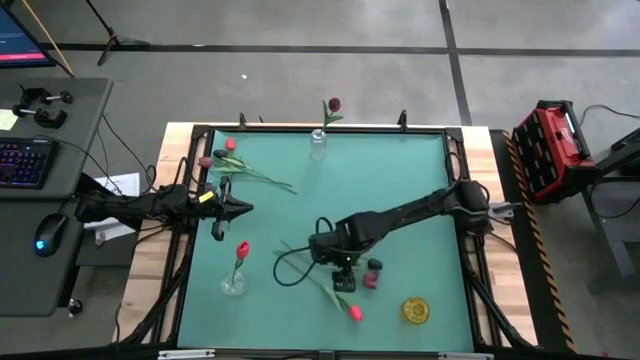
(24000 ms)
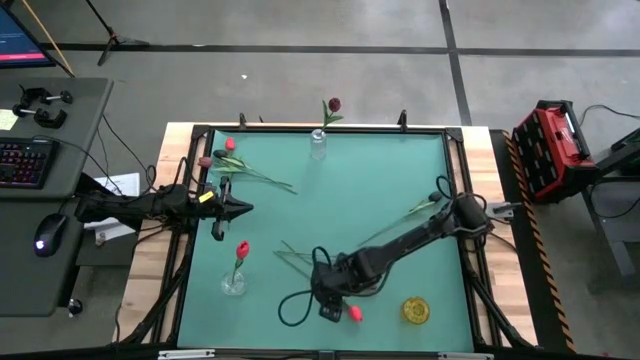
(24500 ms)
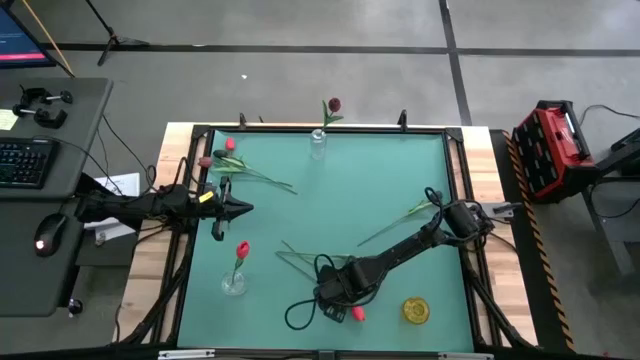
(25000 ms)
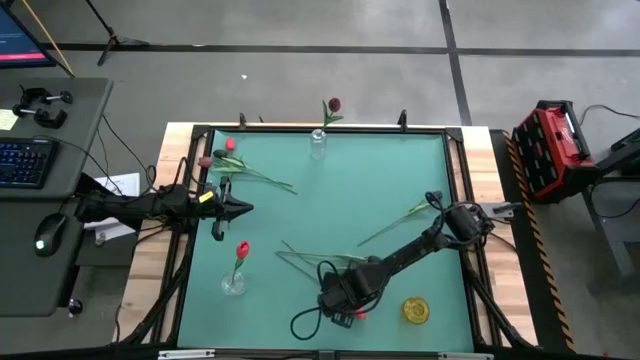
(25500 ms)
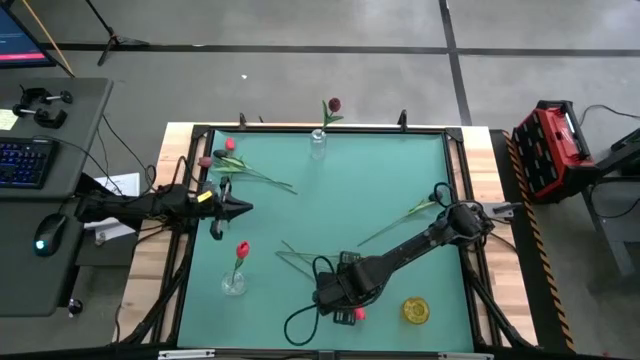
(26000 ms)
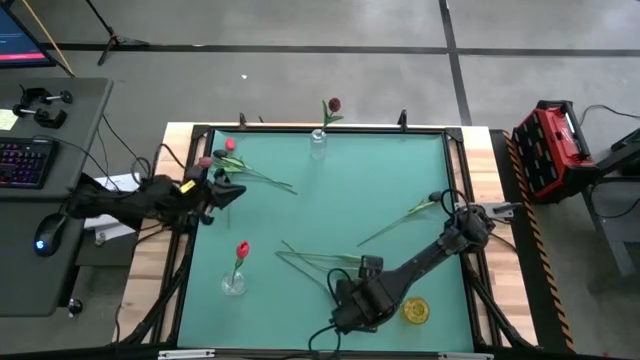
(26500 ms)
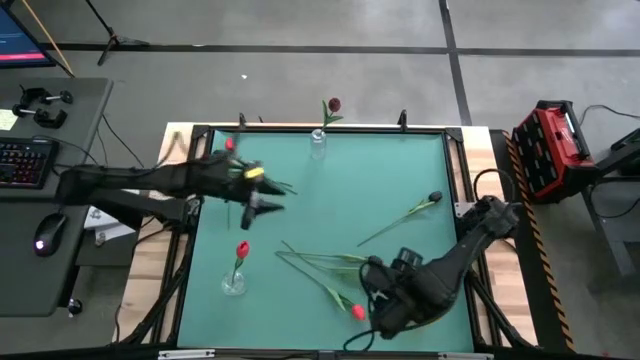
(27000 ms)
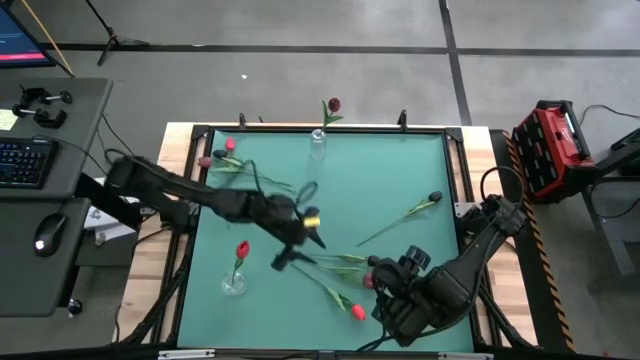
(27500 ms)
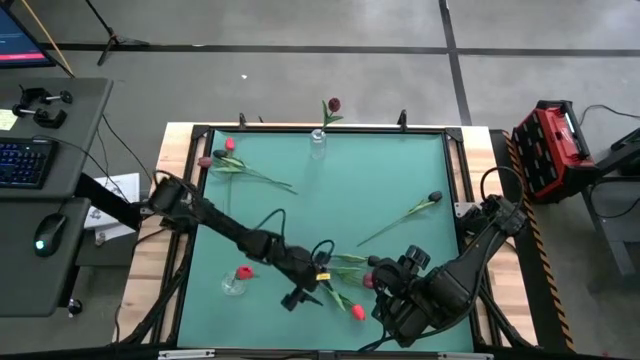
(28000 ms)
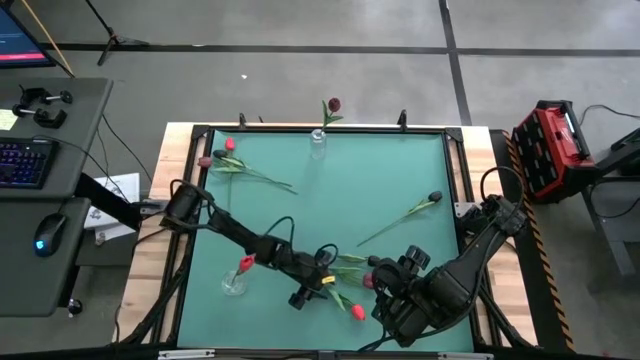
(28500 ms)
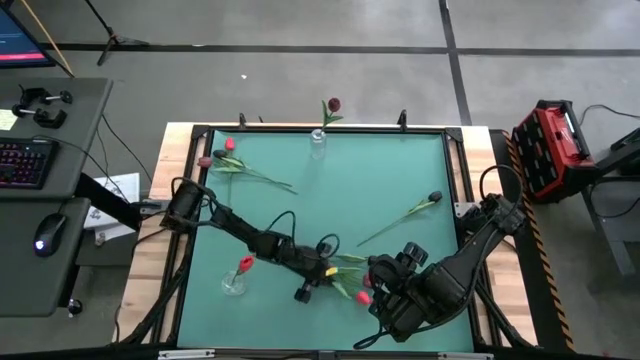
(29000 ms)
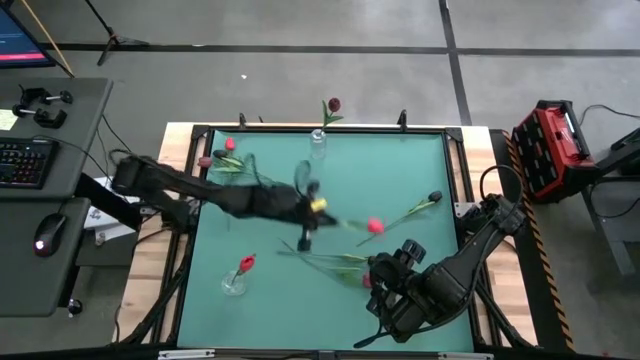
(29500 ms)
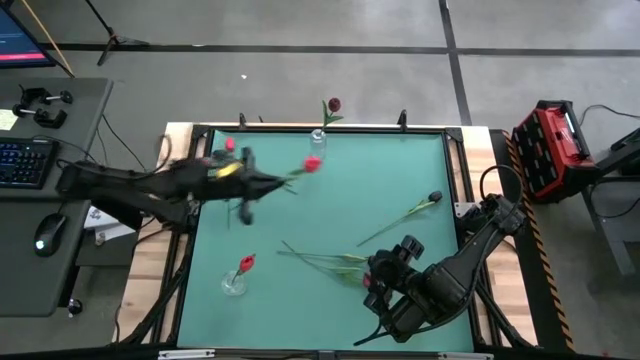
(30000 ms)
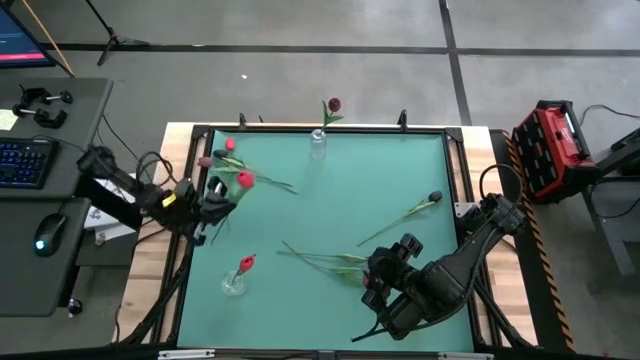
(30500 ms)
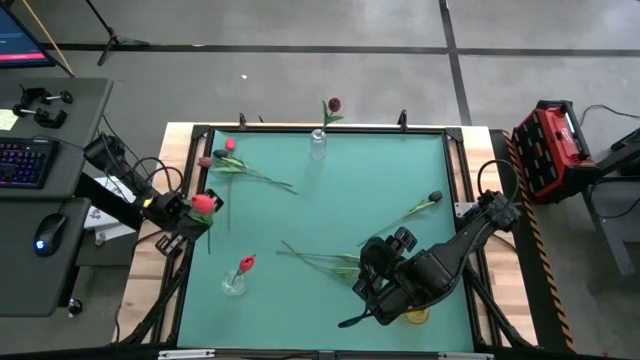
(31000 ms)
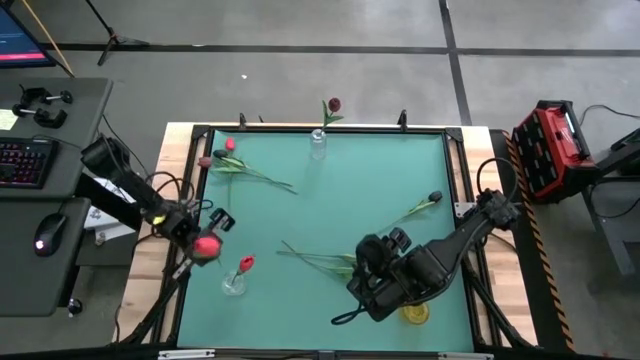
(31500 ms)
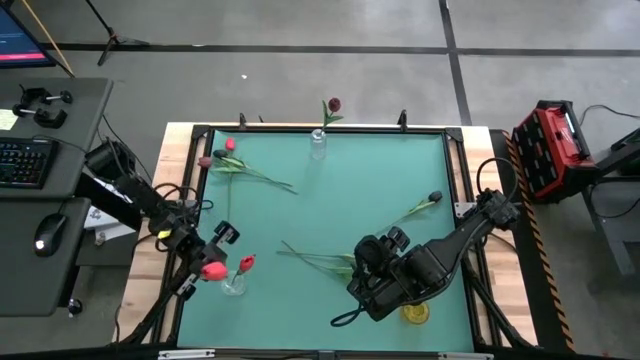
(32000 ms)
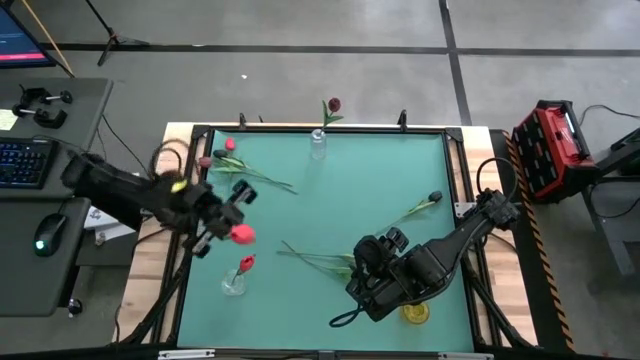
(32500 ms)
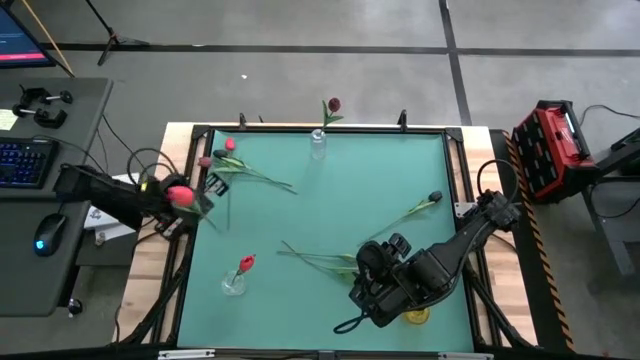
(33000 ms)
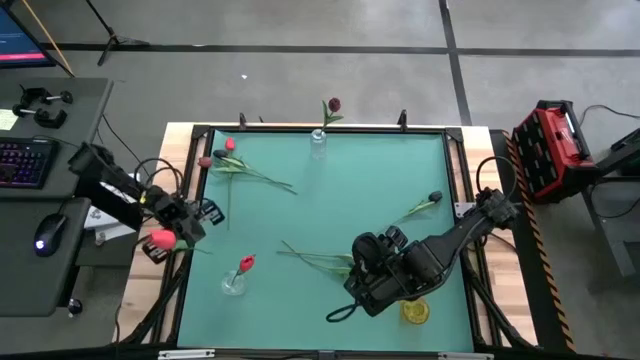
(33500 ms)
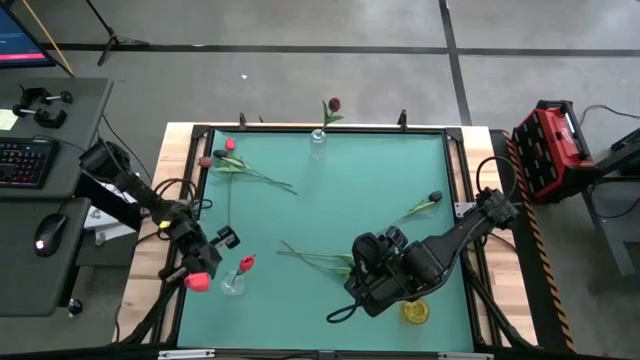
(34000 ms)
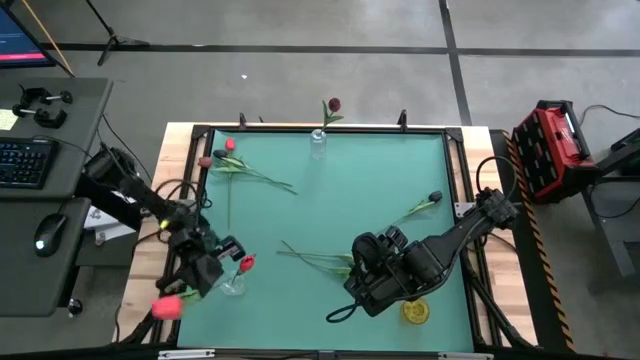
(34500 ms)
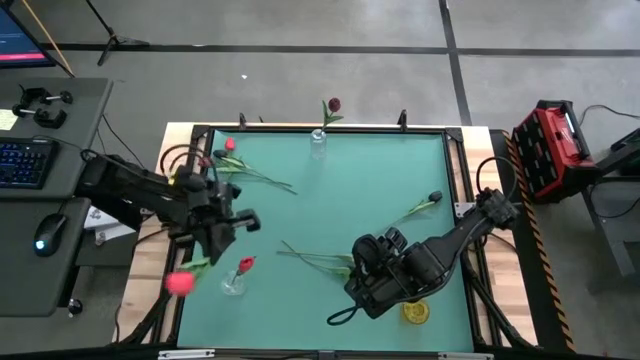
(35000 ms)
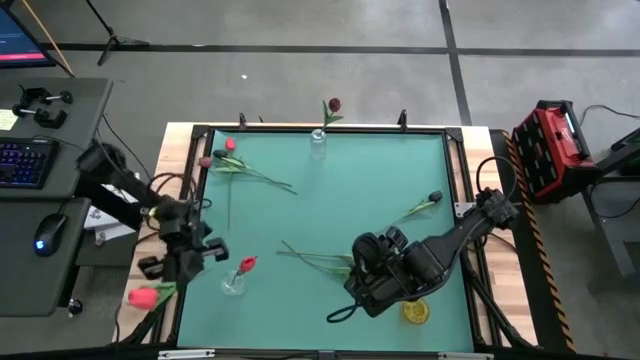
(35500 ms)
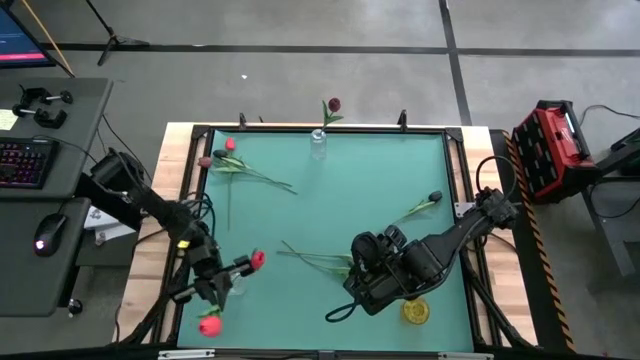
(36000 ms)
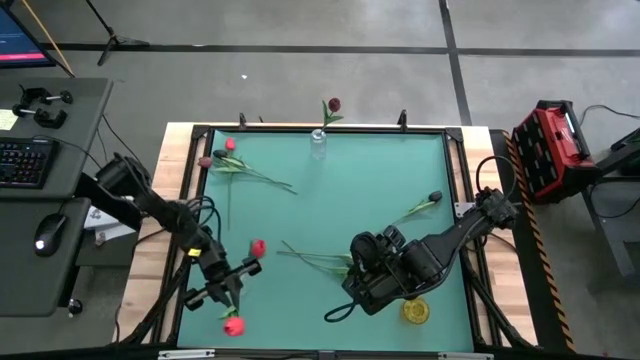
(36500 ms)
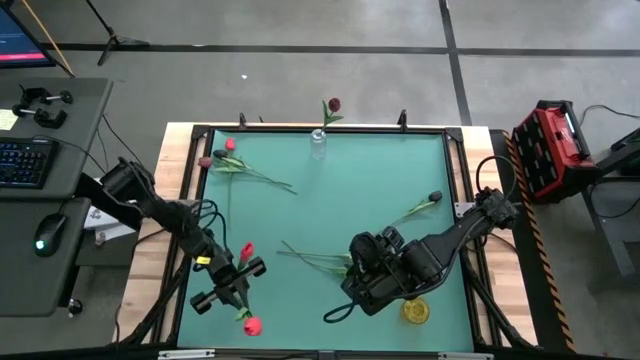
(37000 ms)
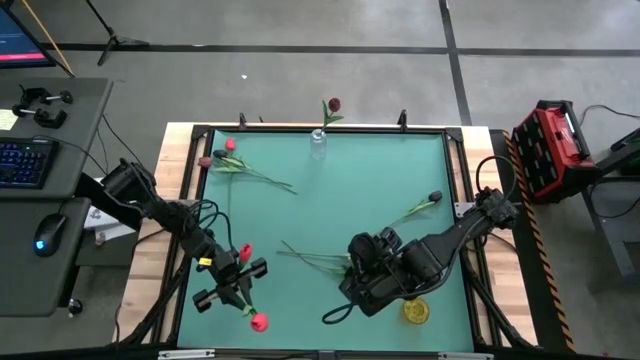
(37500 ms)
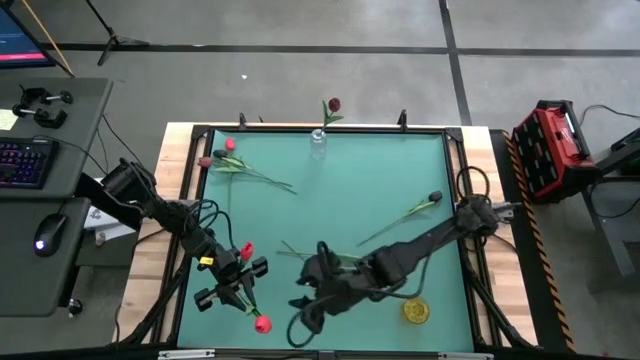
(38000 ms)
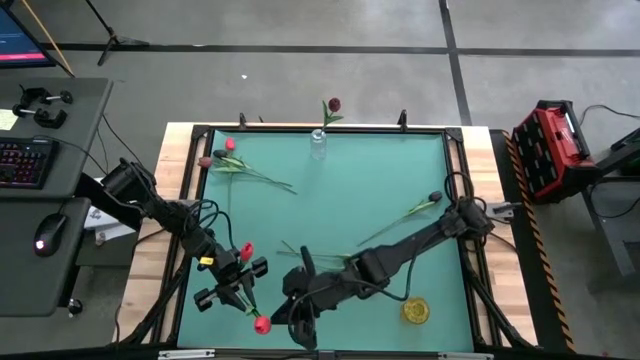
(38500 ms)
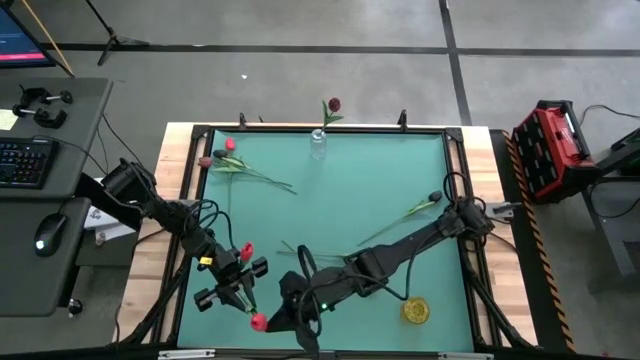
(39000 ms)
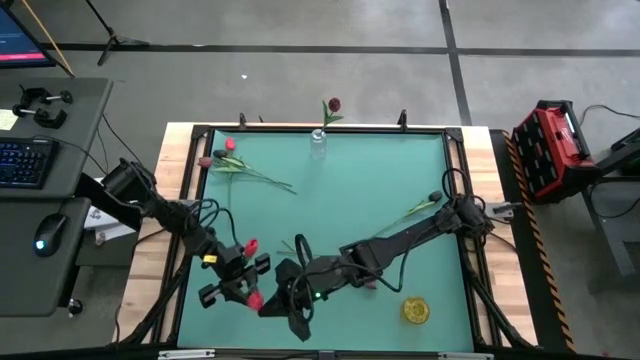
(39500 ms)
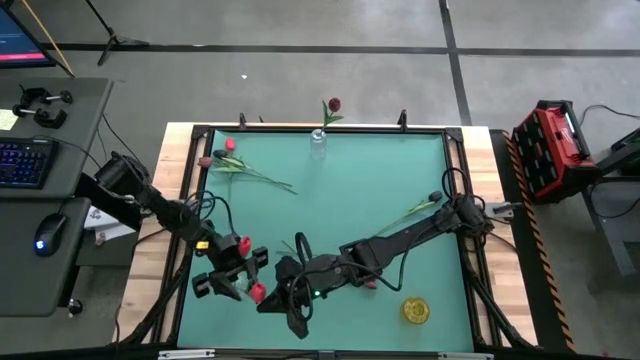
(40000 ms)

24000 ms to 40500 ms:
Task: Sort flowers into vase by color
Put the bottom pink flower into the bottom transparent vase

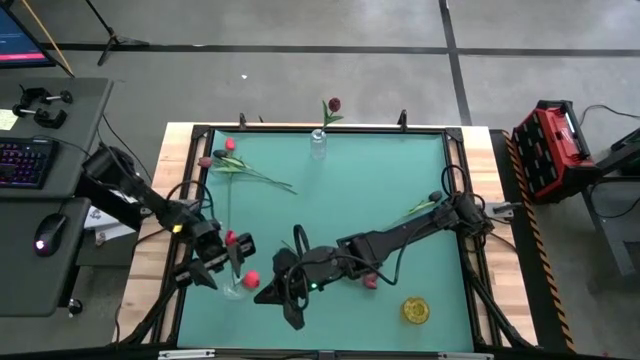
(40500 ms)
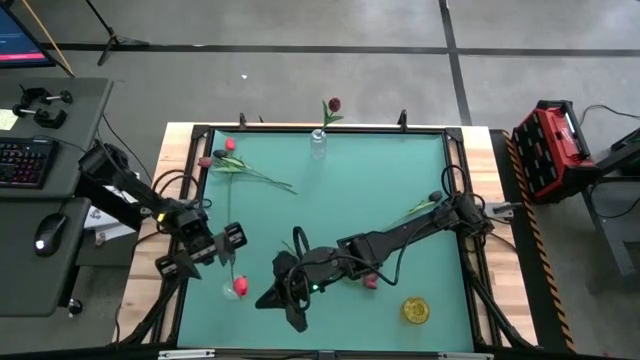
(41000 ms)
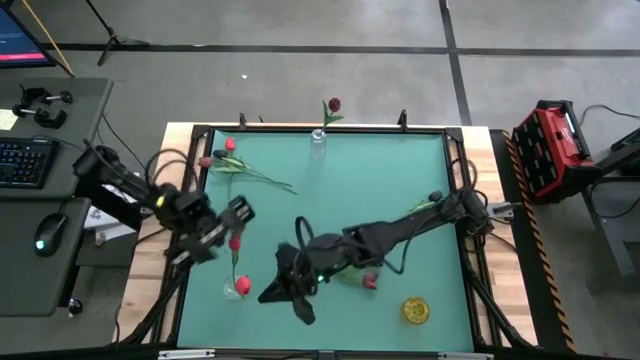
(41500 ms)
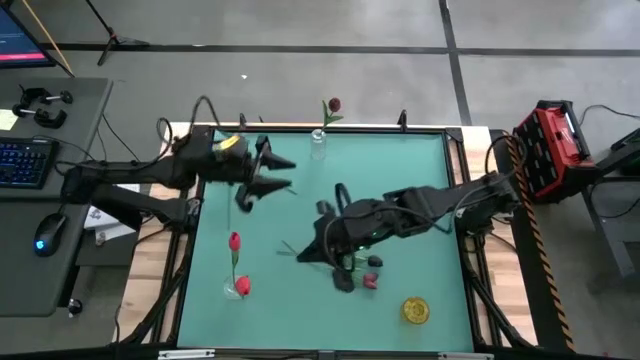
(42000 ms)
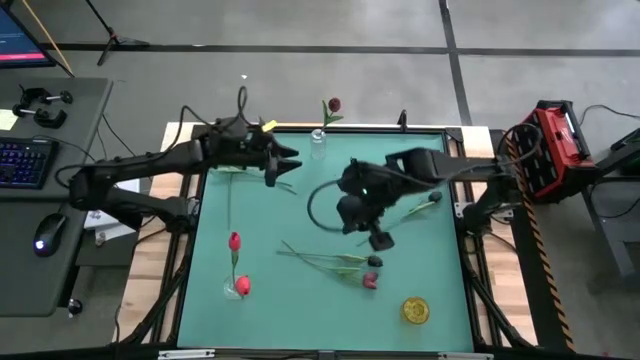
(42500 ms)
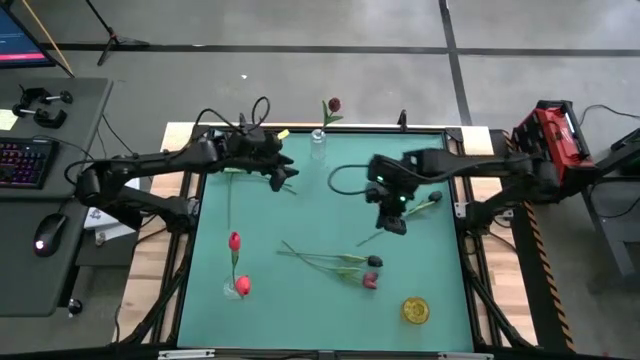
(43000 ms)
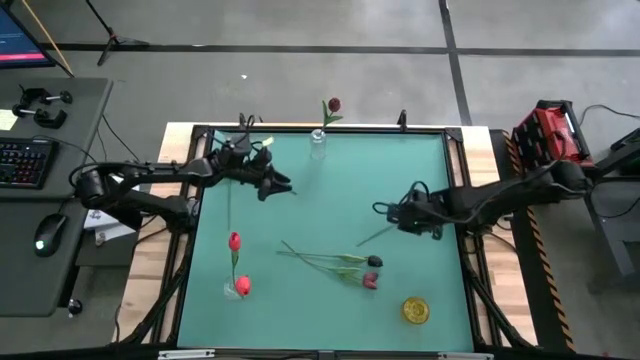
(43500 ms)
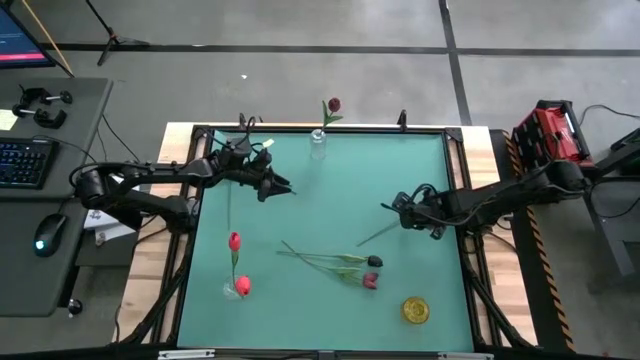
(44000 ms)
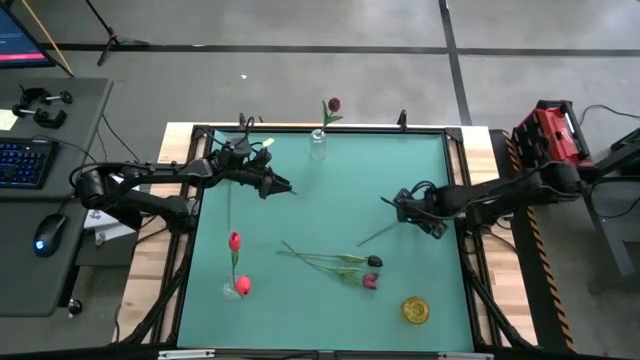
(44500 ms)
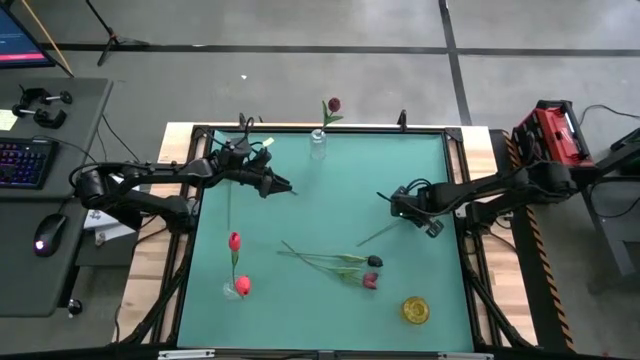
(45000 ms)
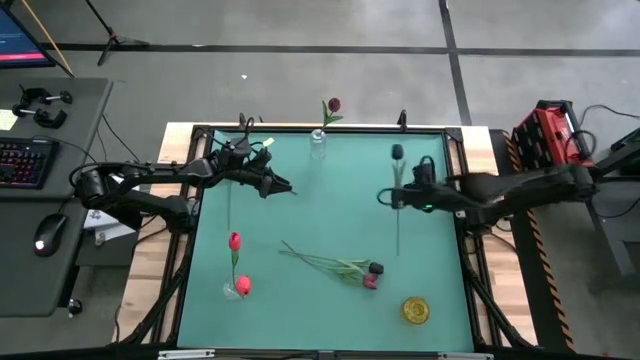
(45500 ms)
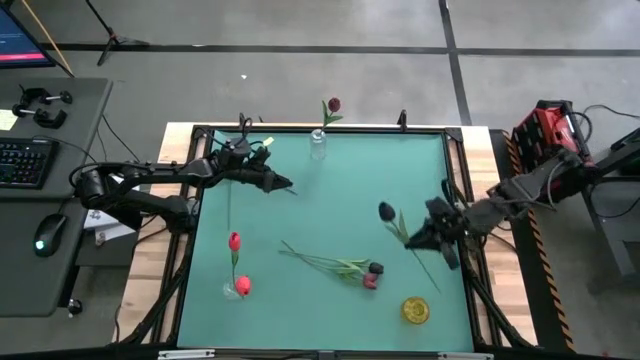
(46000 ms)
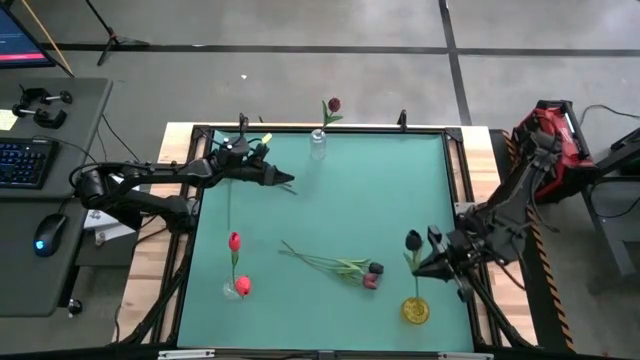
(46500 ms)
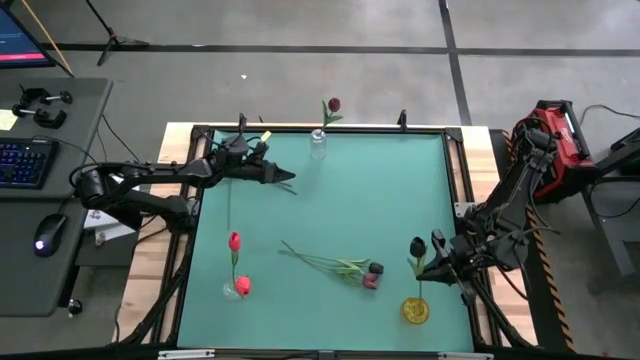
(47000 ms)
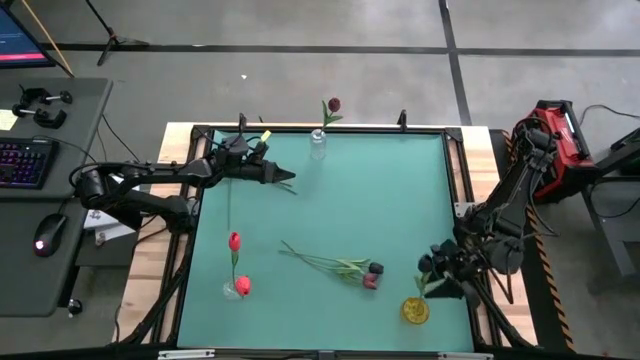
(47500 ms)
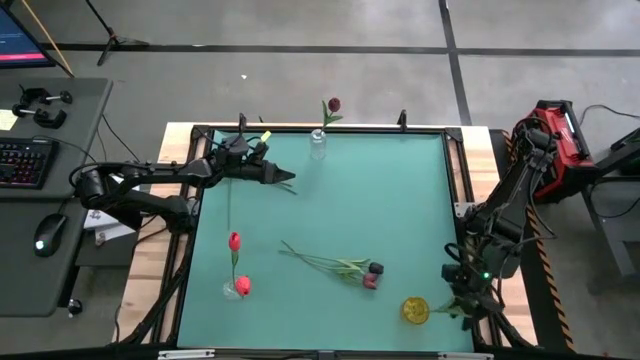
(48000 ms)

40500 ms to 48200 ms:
Put the right black flower into the yellow vase
